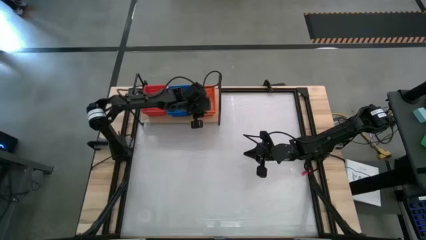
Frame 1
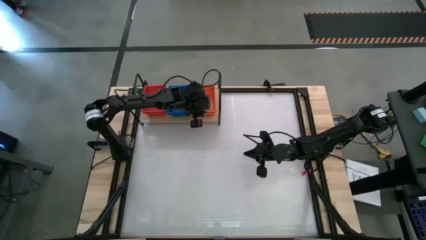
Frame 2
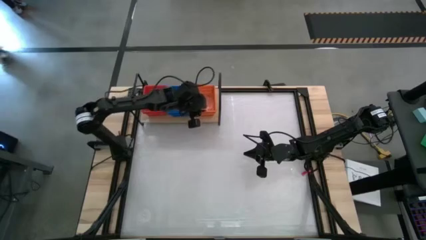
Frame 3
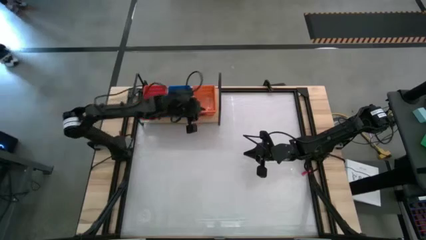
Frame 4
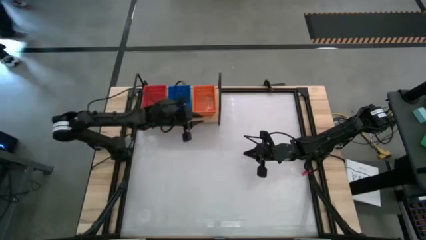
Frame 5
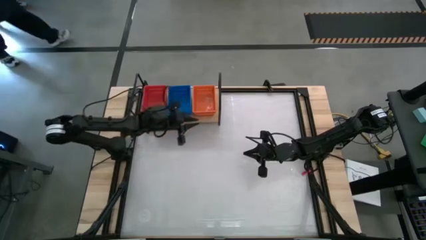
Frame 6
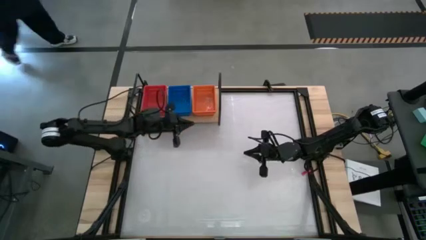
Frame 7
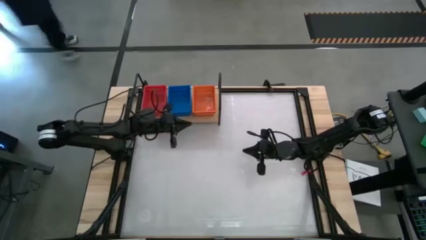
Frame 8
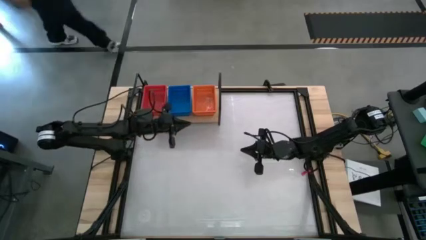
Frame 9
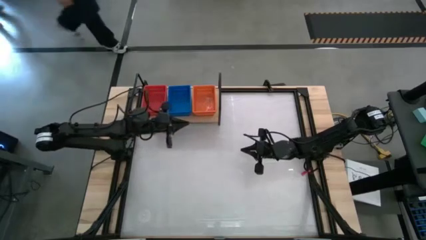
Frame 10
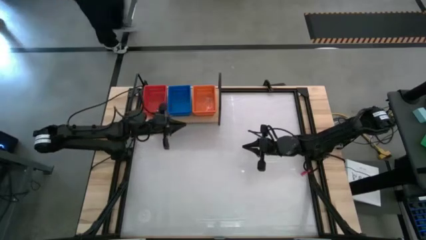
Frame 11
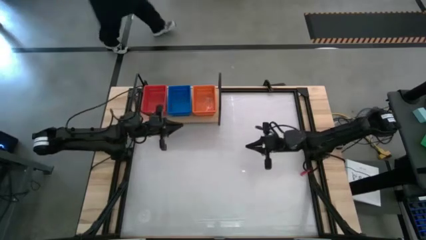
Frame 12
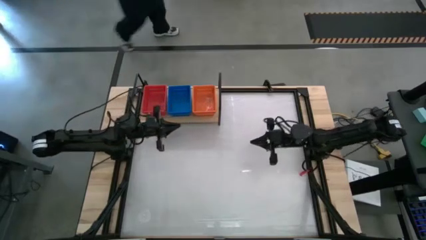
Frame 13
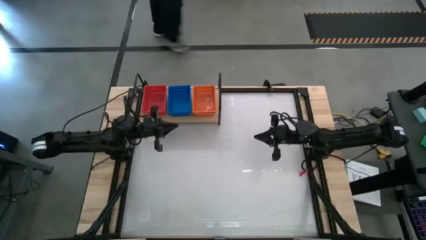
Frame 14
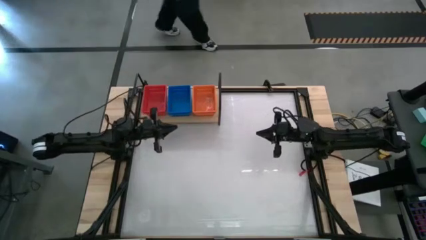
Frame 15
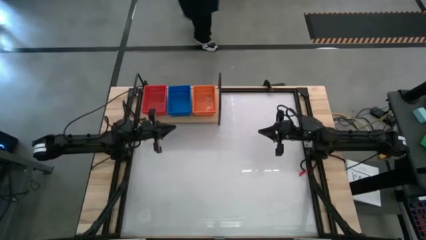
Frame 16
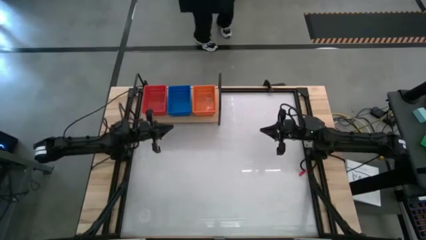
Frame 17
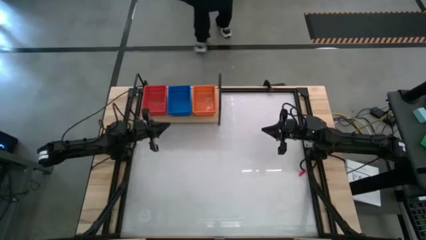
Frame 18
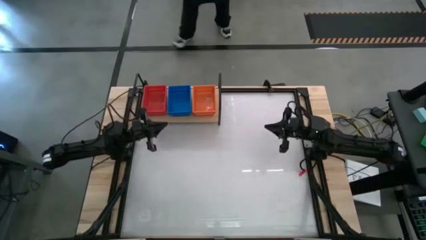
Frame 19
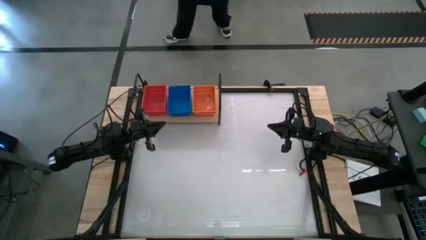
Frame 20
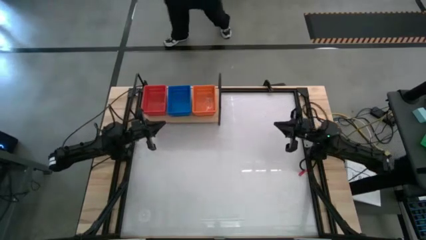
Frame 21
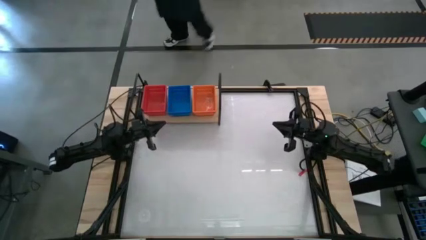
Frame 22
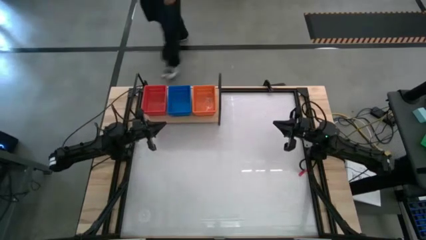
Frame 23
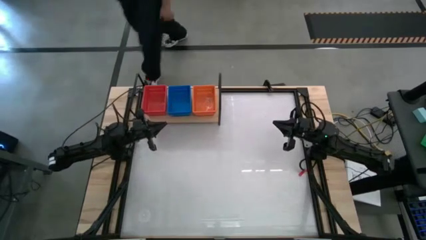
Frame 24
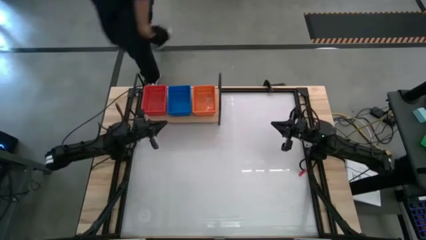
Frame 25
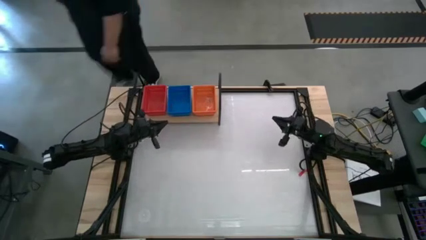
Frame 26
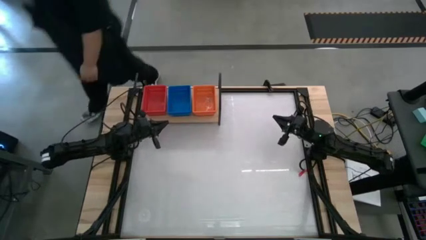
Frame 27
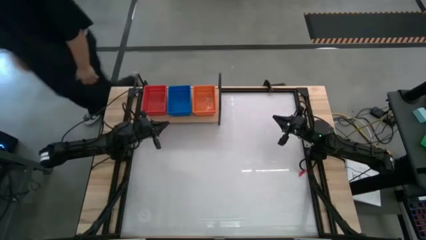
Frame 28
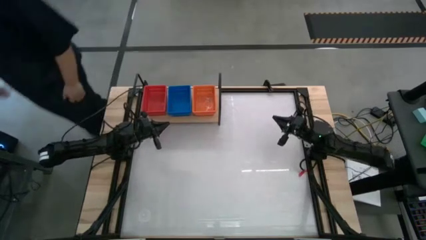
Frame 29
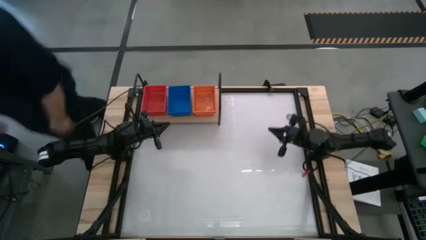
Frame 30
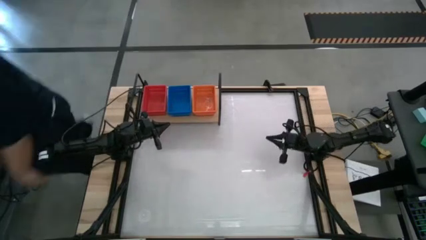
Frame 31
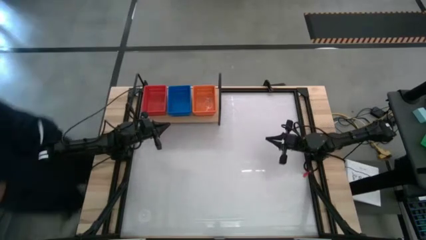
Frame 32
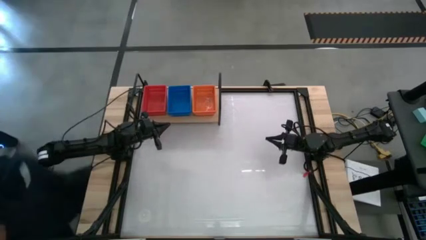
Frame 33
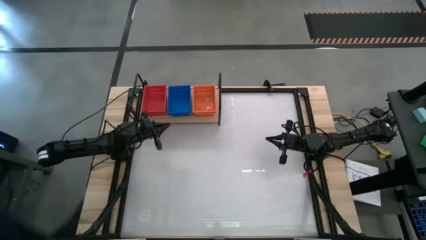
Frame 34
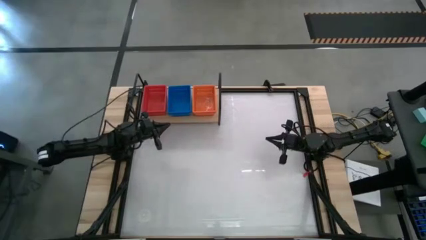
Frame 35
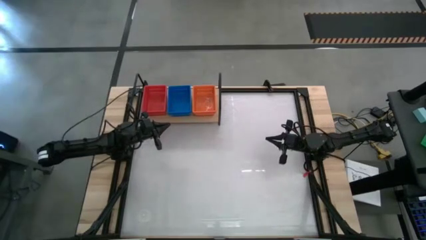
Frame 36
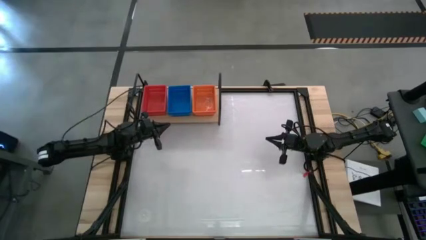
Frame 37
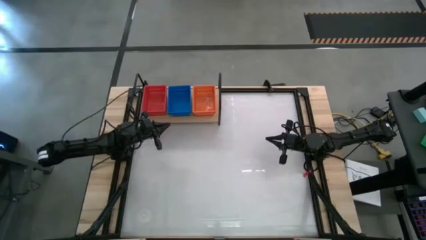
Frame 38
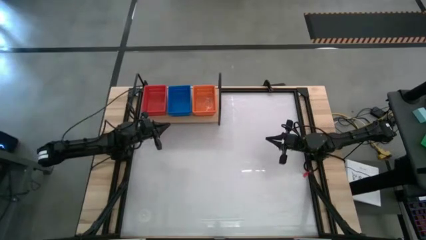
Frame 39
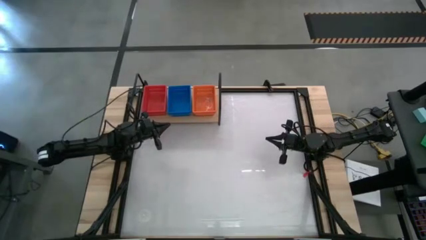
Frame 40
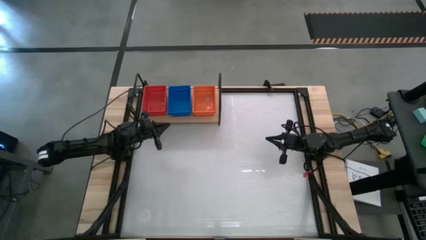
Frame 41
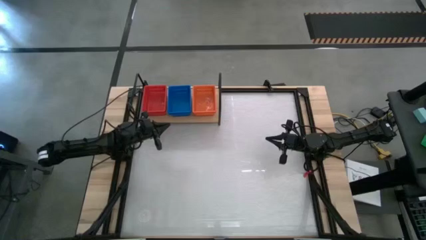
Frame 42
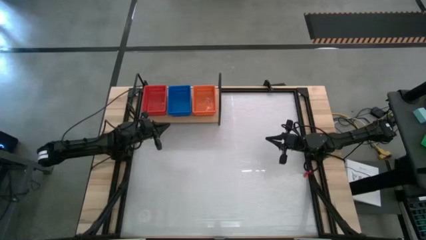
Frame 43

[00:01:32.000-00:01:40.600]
Task: Stack baskets on shelf by color
Return to Home Position

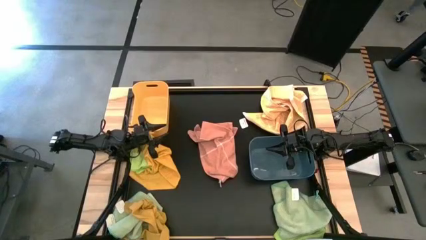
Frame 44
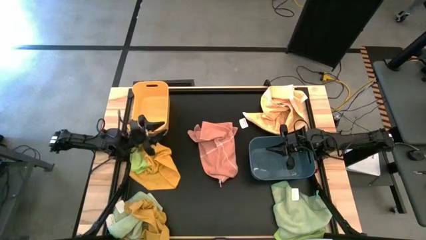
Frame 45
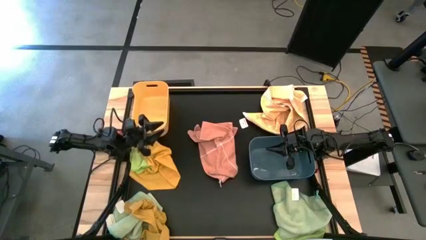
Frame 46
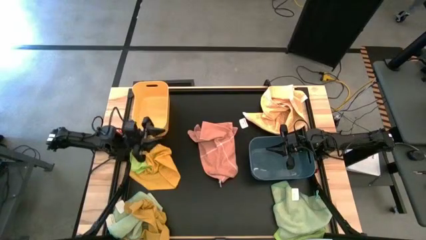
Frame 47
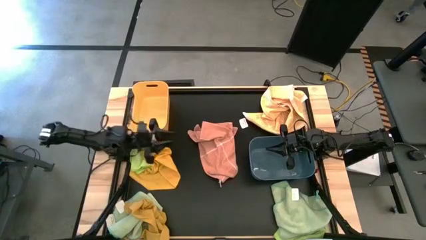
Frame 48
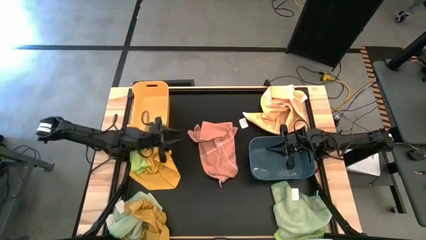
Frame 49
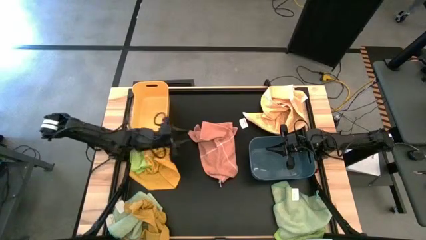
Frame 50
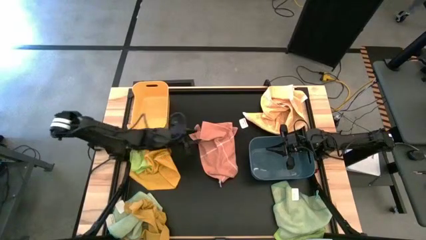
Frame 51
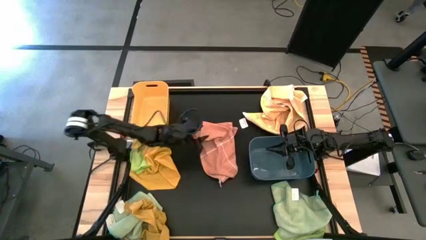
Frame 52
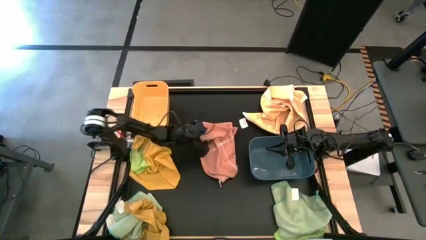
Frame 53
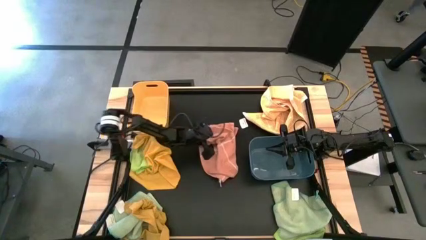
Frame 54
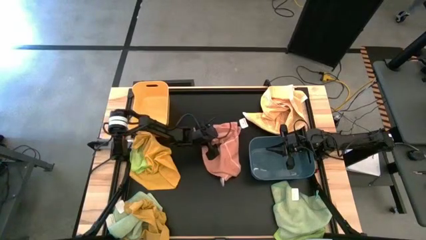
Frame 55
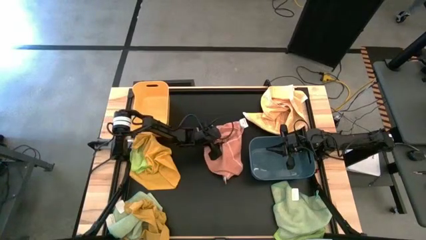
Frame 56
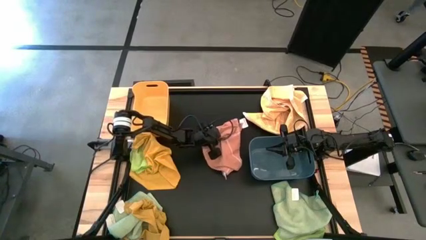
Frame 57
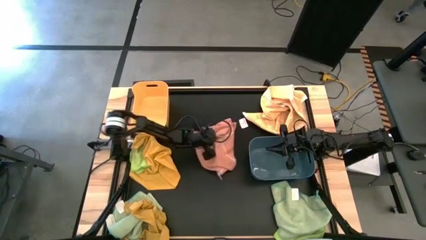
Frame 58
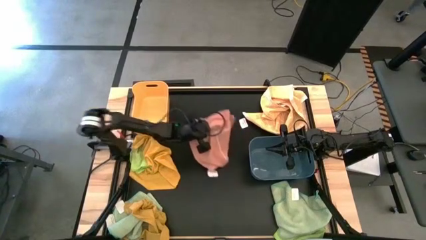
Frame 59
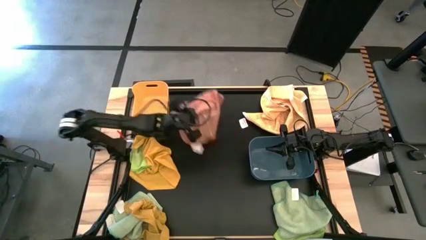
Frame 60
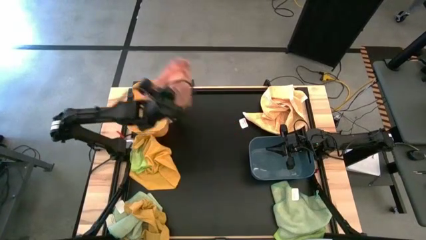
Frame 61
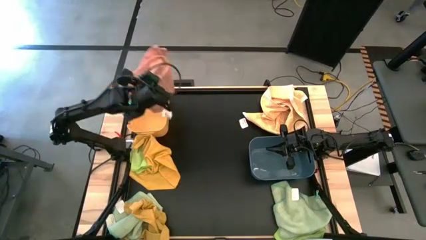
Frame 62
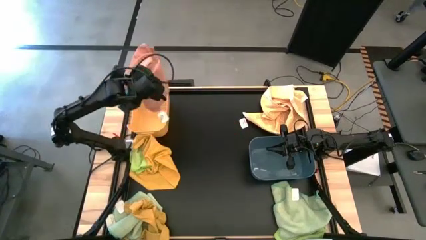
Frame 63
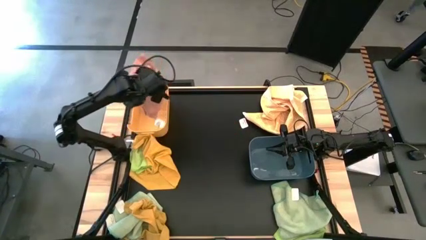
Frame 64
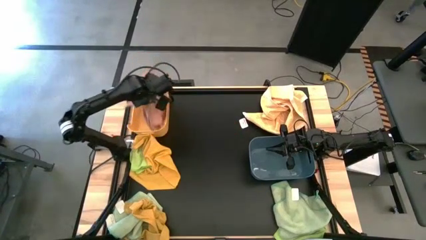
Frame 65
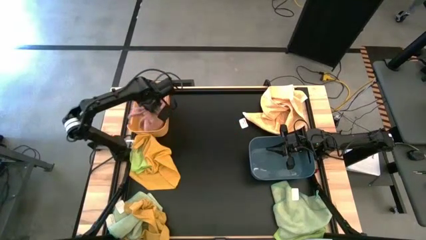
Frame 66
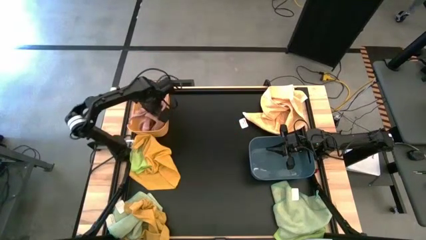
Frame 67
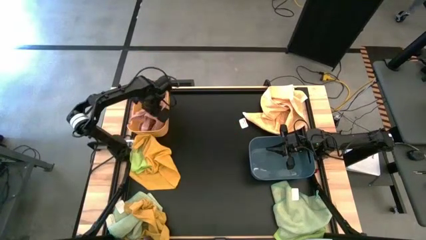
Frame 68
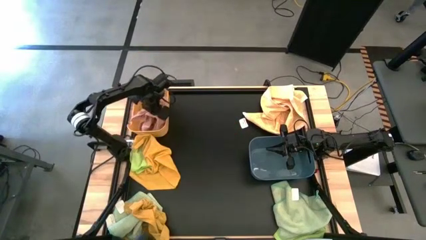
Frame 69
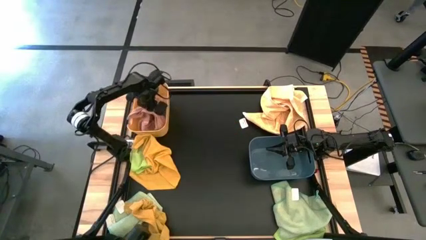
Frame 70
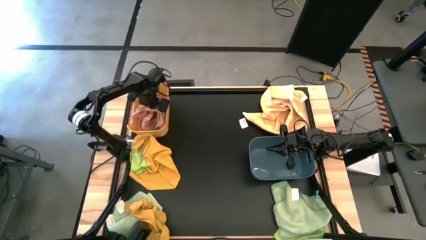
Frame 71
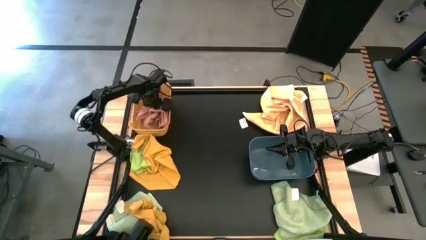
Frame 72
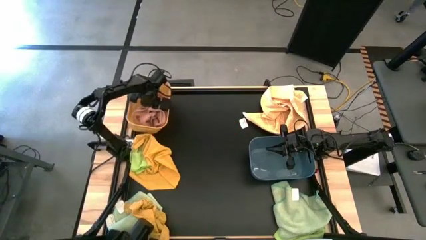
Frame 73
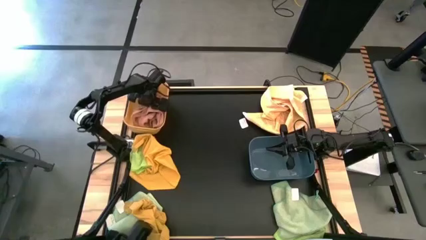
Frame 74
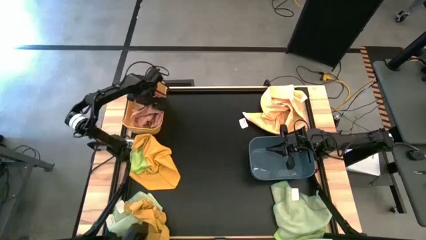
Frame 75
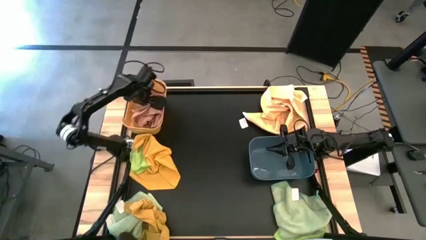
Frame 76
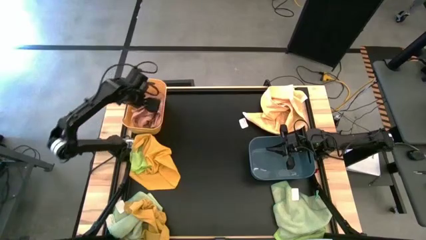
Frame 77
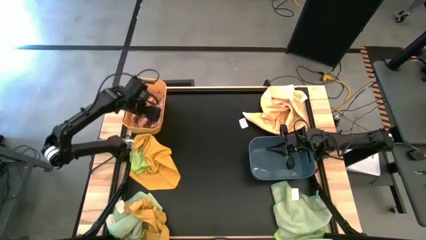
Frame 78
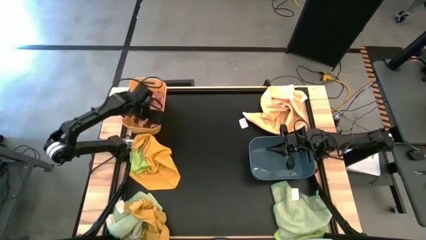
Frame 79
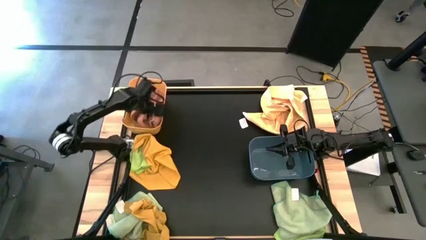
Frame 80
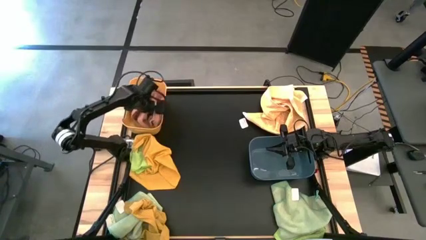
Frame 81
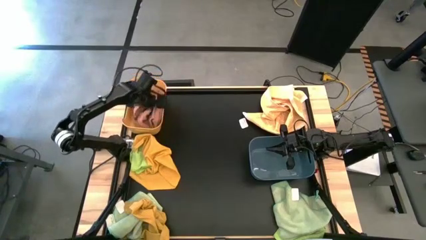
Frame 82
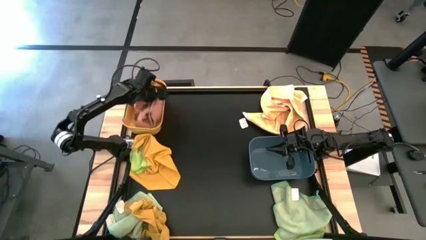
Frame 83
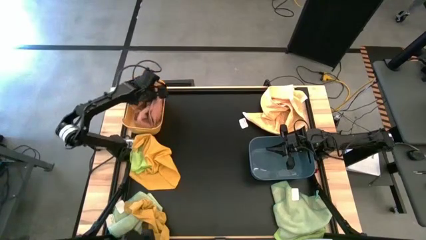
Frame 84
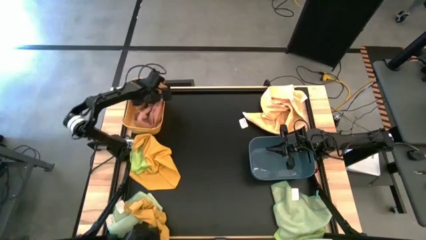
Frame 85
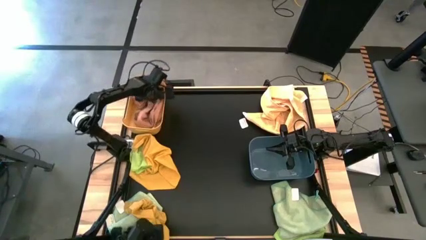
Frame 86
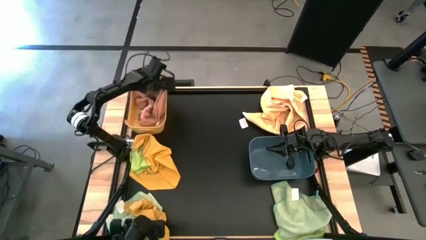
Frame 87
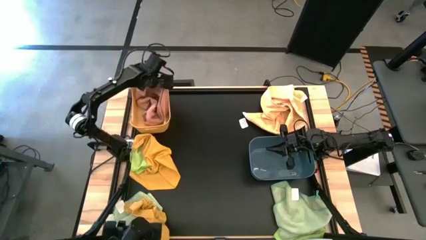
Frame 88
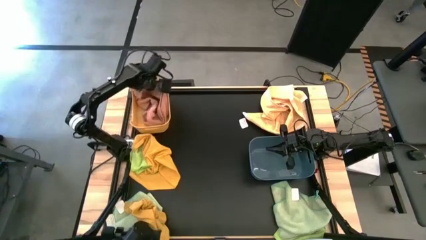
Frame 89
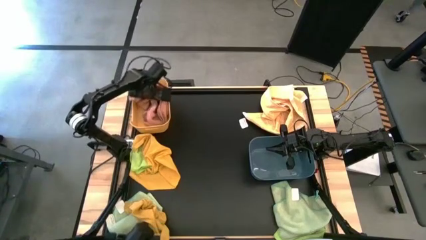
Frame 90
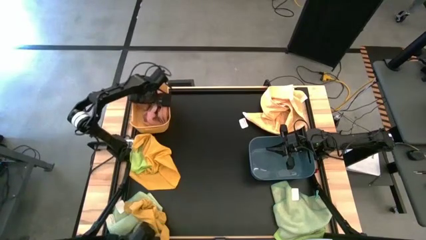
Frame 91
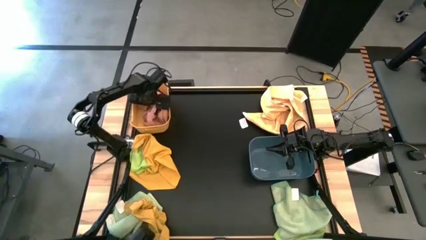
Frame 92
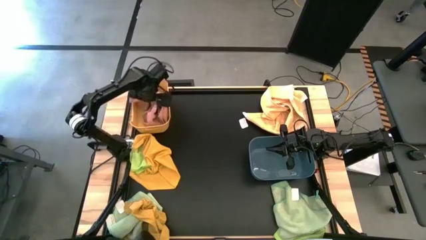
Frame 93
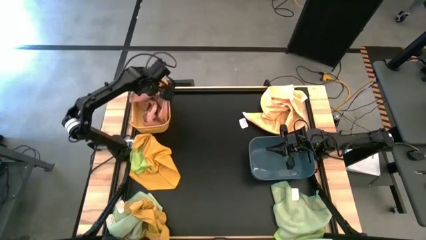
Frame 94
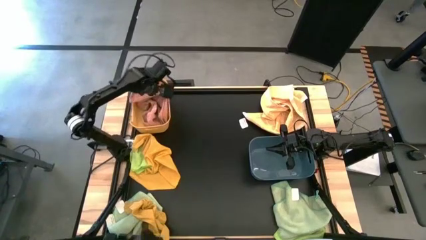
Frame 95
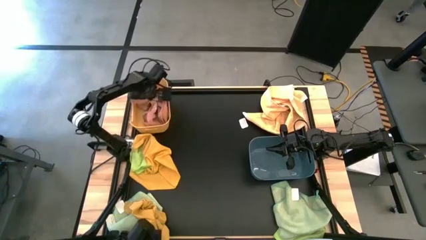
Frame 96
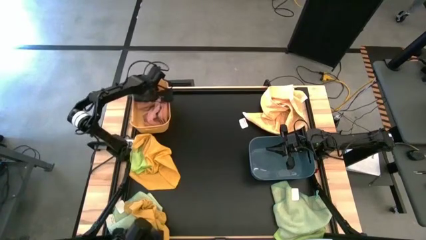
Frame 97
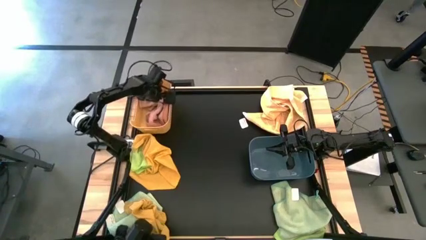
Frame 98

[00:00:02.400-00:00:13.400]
Task: Sort towels by color in basket
Put the pink microfiber cloth into the yellow bin
